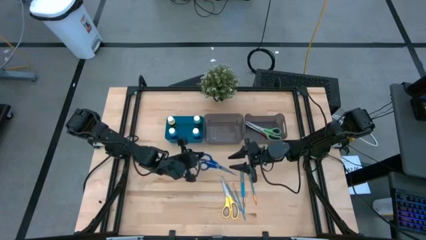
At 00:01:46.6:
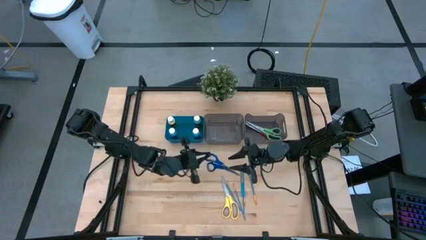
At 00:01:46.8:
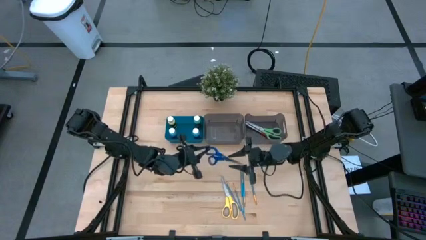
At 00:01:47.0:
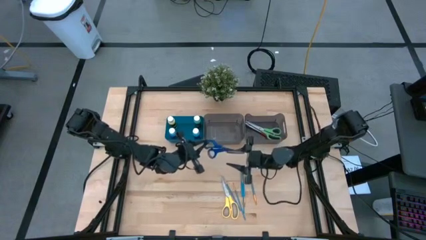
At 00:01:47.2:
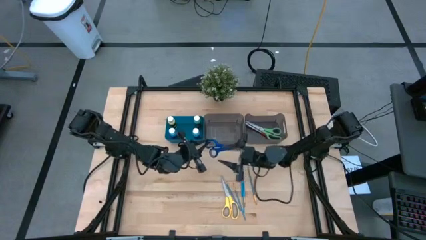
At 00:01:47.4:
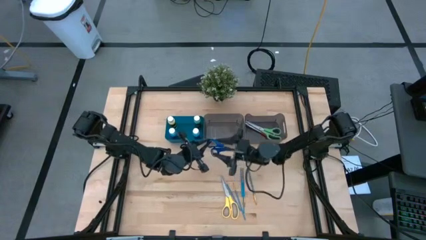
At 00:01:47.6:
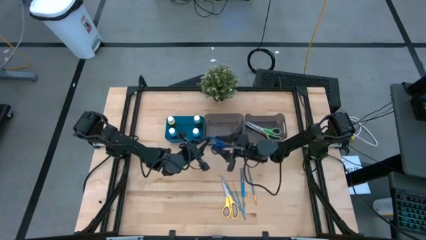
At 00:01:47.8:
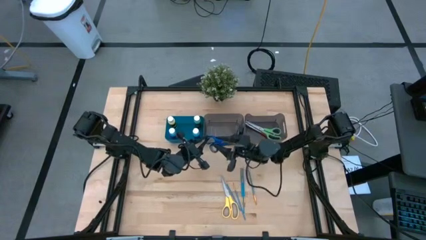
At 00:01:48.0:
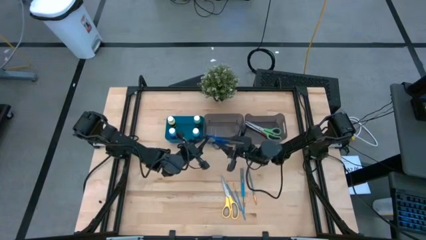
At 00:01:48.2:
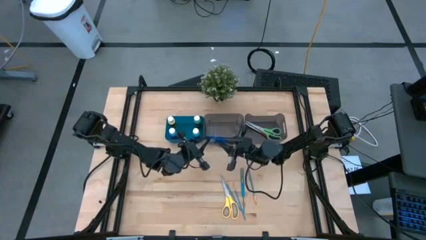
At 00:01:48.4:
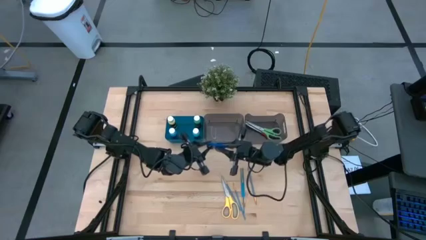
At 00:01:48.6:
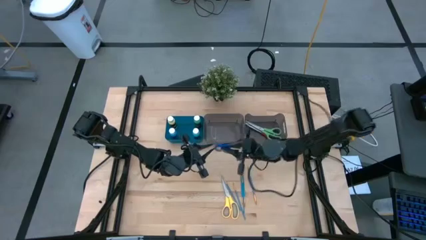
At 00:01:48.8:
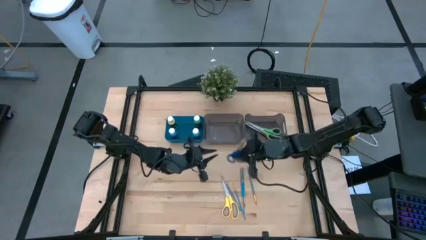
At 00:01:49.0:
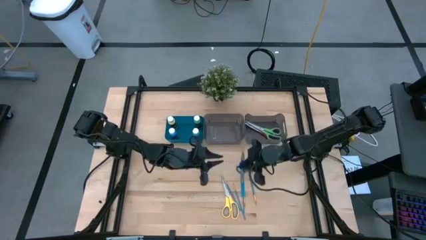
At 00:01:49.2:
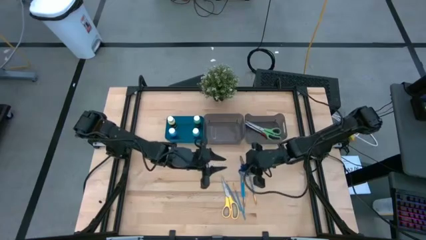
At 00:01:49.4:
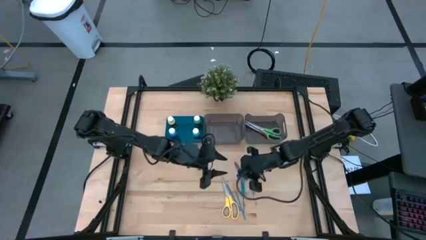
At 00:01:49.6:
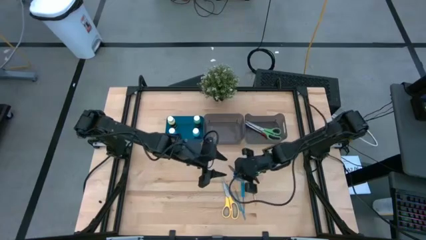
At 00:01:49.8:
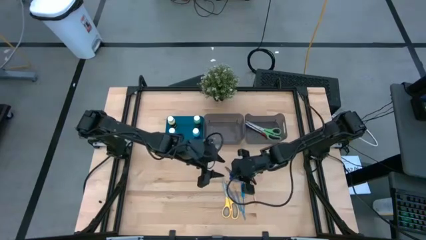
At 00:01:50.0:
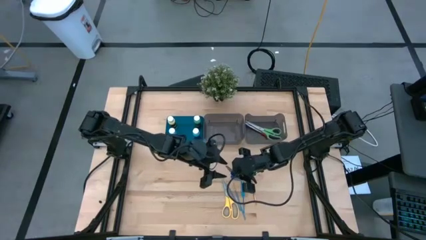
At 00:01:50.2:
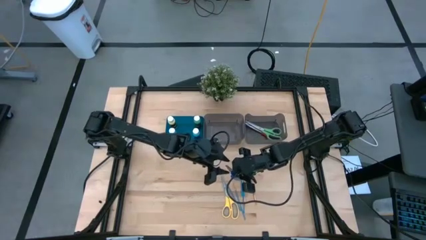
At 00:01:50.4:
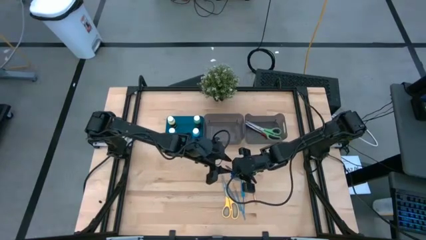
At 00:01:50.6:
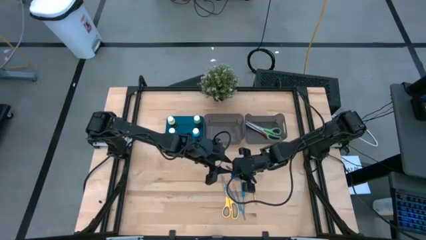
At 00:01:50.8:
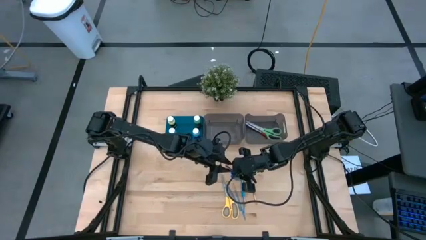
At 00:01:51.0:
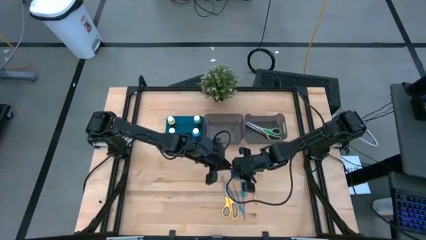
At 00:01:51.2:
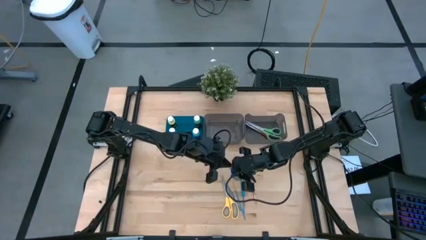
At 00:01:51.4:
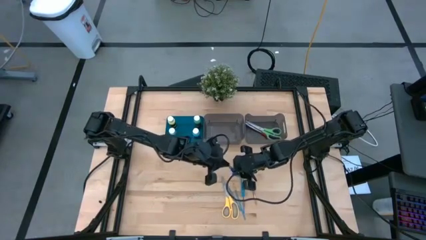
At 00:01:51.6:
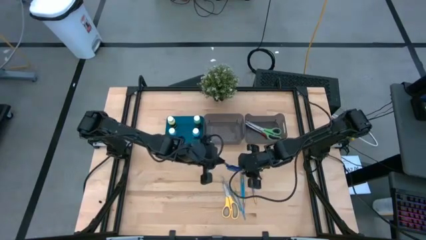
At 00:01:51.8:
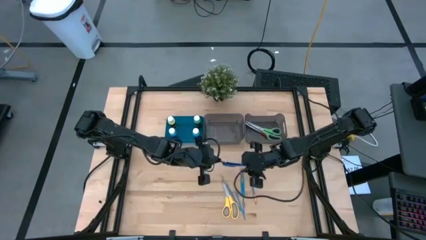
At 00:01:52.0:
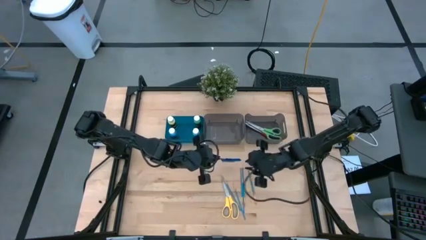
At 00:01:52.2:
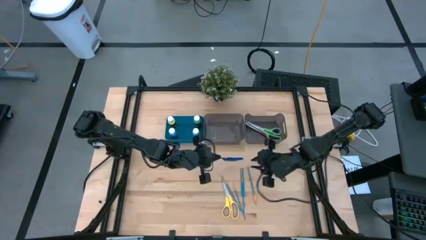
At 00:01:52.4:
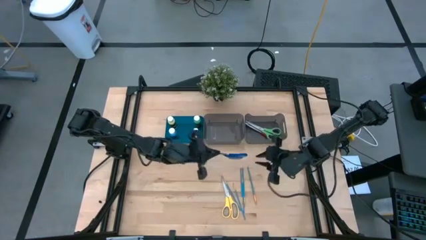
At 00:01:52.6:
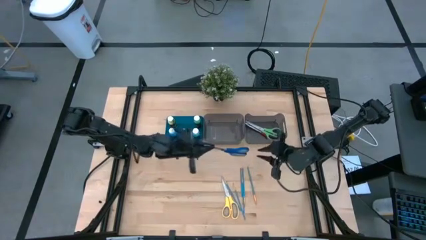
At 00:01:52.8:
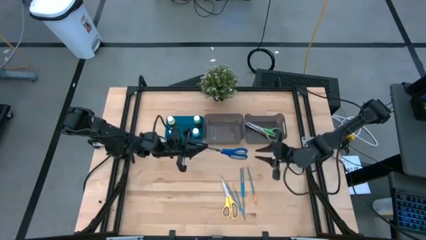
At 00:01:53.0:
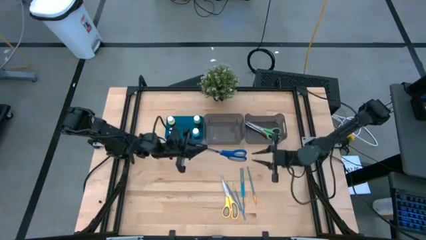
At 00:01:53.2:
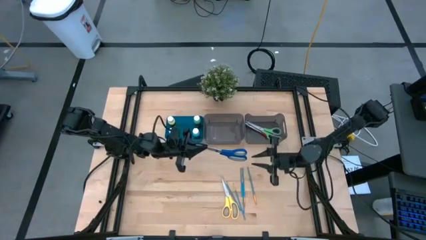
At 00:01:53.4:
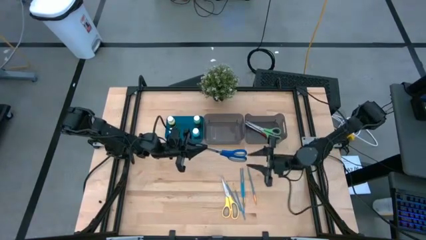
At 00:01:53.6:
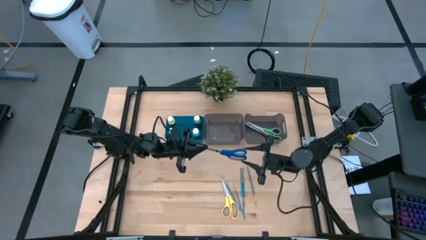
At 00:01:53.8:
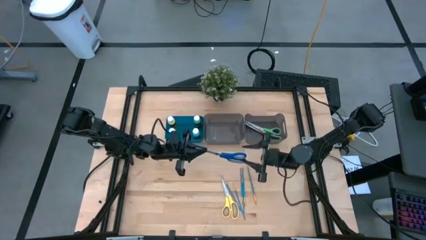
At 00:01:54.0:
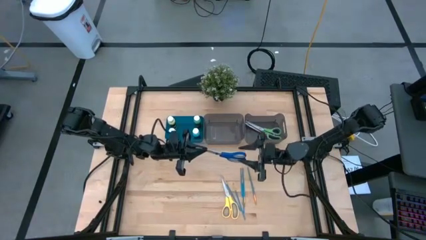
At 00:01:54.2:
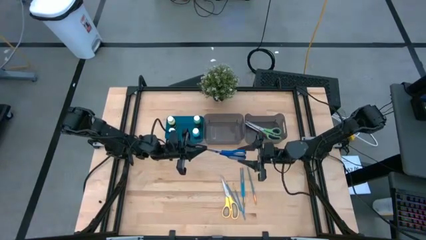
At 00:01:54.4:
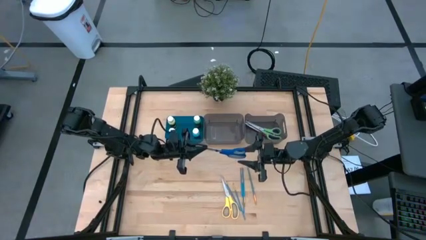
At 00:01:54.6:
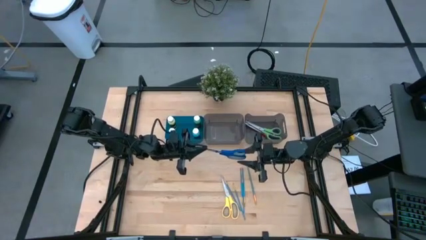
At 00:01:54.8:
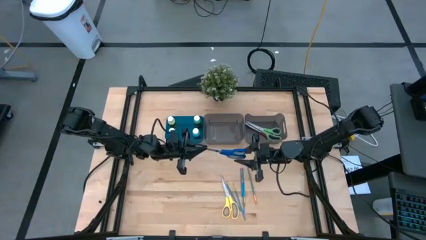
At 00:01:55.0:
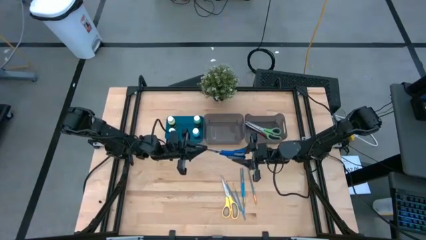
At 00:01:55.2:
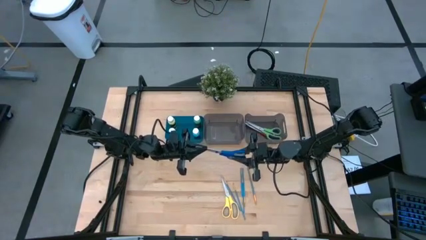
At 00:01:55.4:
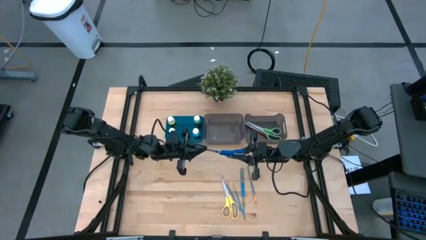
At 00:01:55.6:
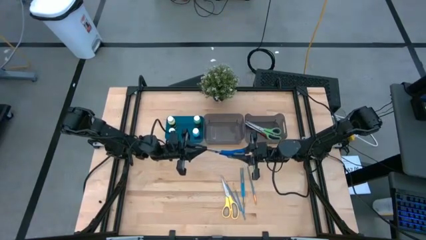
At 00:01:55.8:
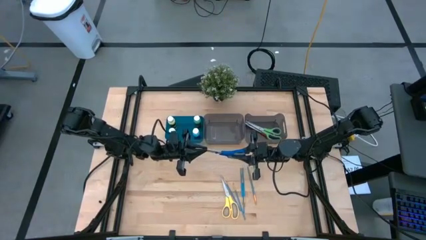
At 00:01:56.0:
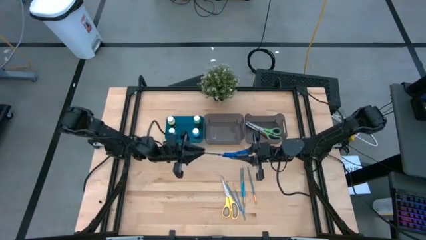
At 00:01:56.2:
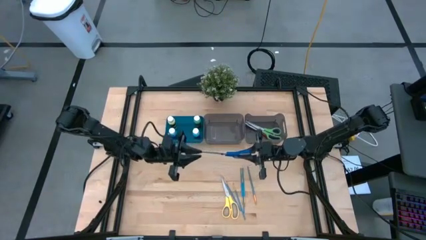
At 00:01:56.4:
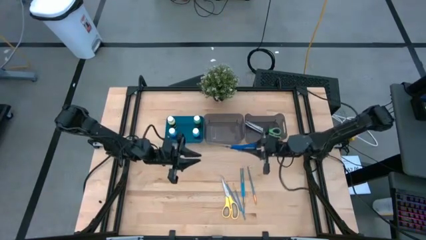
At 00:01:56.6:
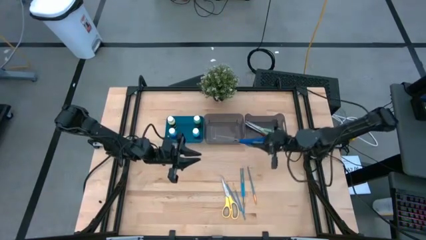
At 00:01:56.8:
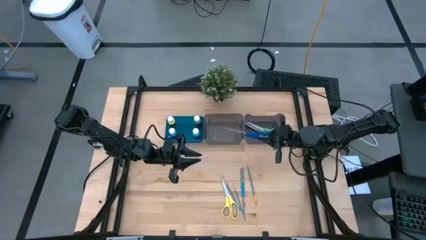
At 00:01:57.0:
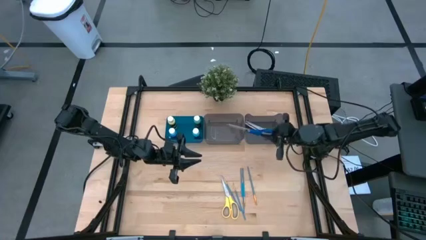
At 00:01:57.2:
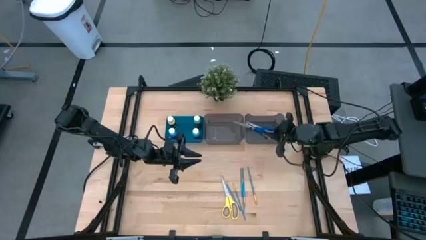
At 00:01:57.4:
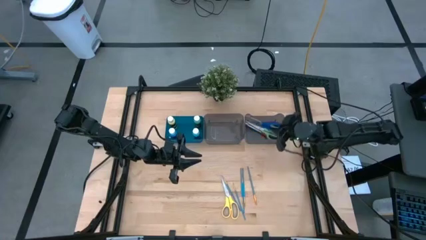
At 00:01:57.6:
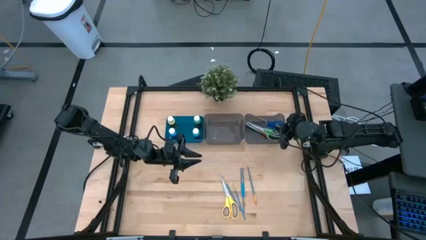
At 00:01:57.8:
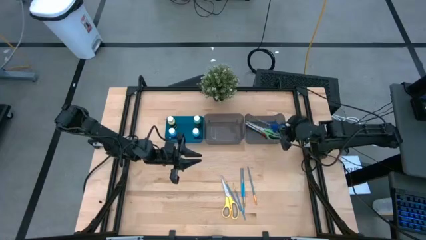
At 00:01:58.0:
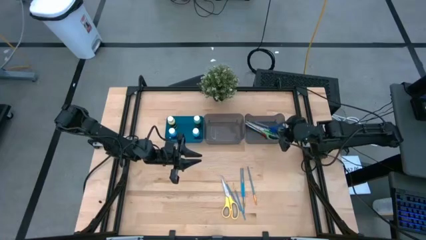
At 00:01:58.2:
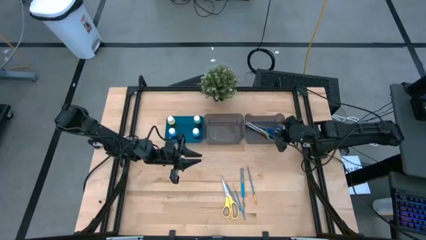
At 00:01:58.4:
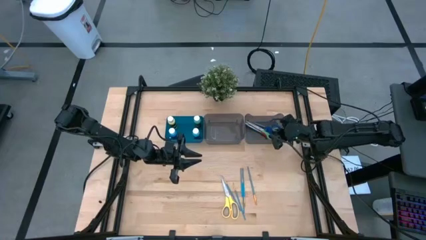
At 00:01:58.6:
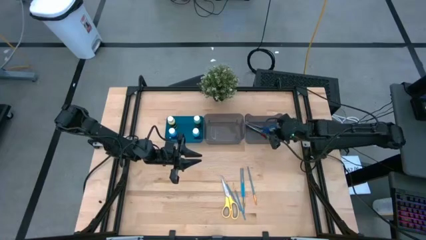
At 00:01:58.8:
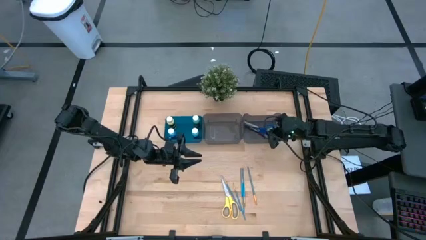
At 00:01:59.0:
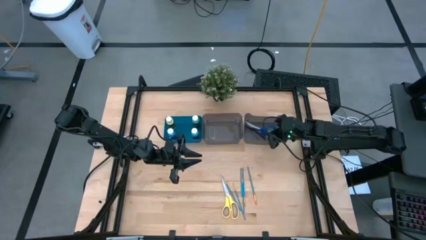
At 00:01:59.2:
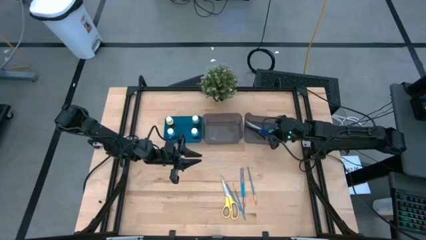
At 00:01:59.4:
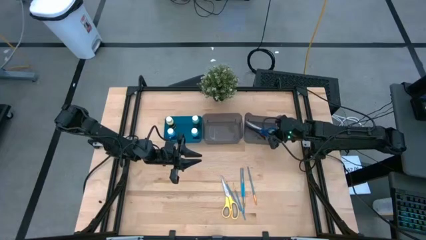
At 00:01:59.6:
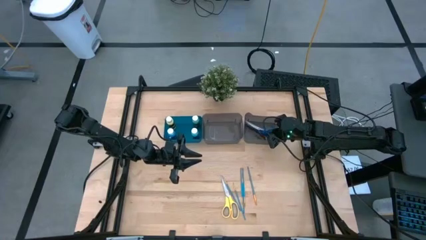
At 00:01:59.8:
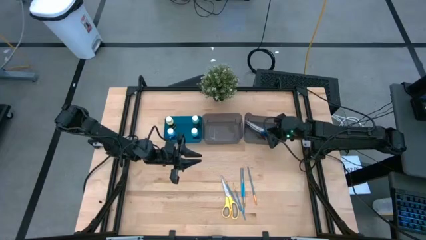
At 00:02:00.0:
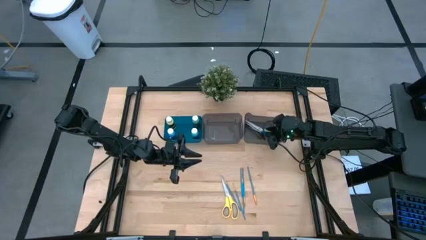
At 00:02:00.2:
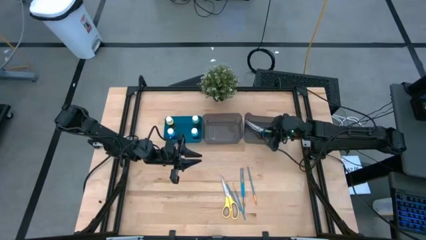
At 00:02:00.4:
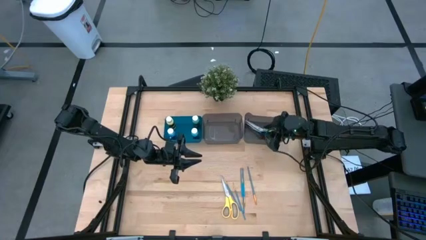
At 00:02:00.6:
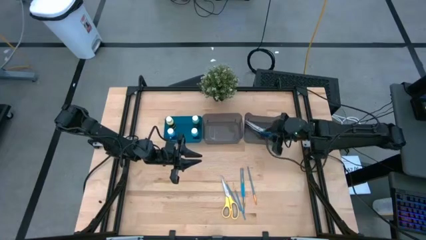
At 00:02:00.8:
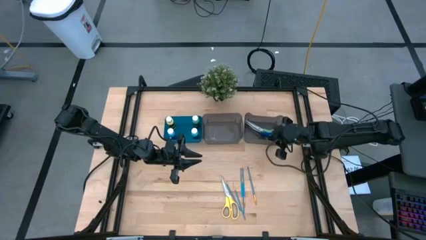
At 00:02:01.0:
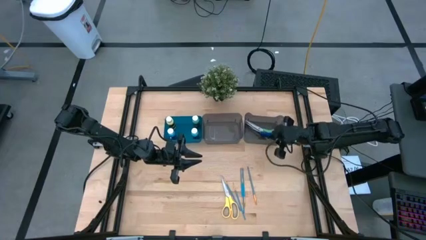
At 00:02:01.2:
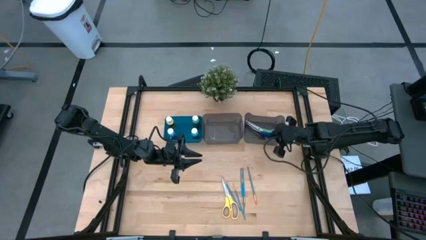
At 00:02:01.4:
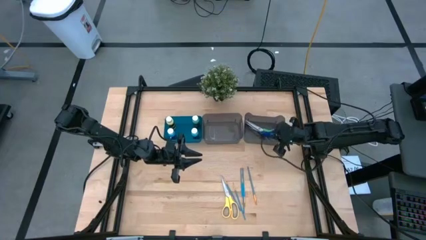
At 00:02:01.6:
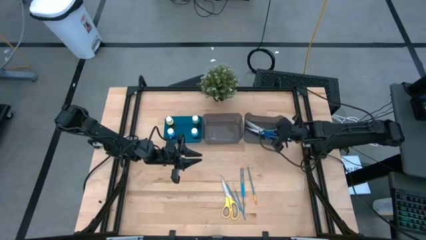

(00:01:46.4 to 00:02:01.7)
Task: Pick & Place Paint Supplies
Put the blue scissor into the right black bin
